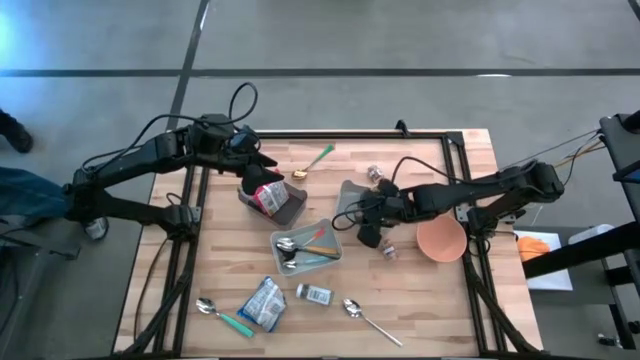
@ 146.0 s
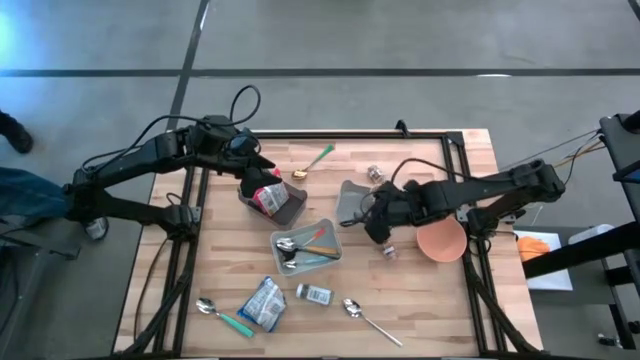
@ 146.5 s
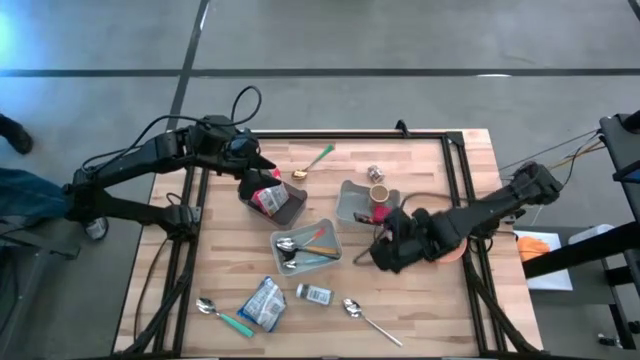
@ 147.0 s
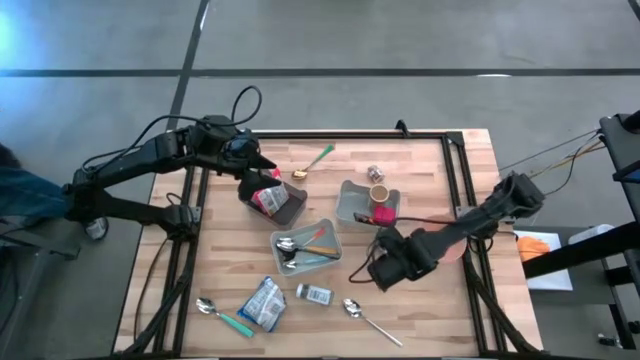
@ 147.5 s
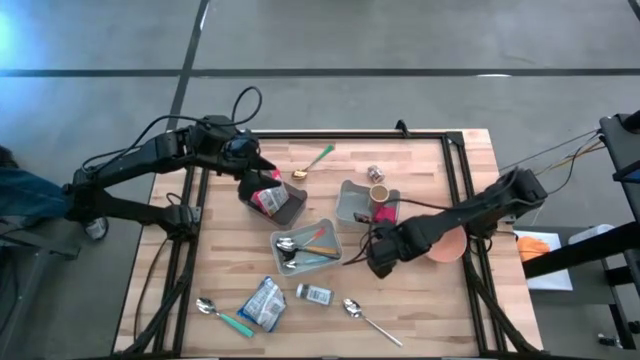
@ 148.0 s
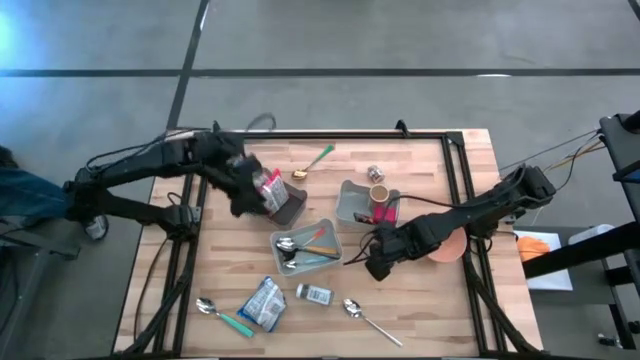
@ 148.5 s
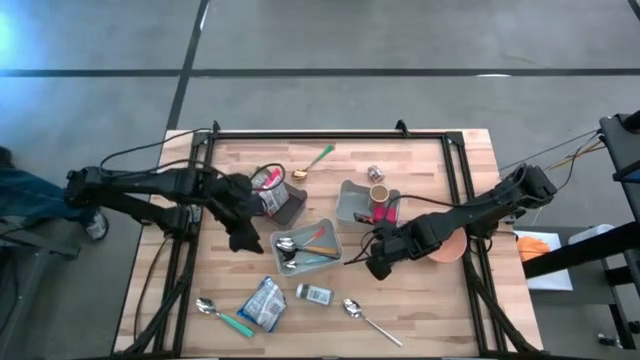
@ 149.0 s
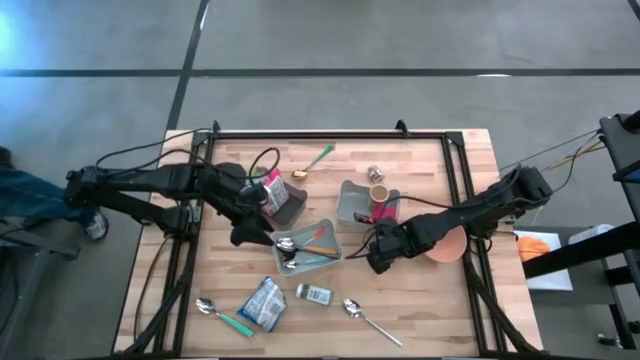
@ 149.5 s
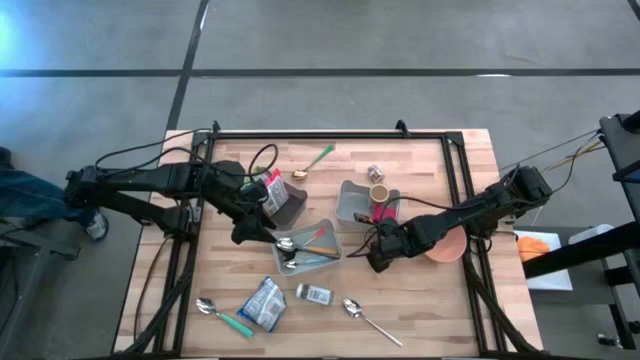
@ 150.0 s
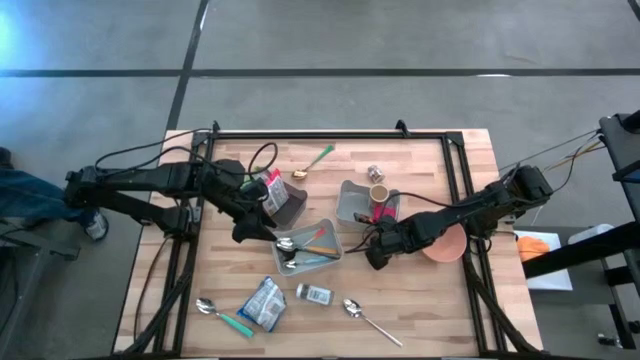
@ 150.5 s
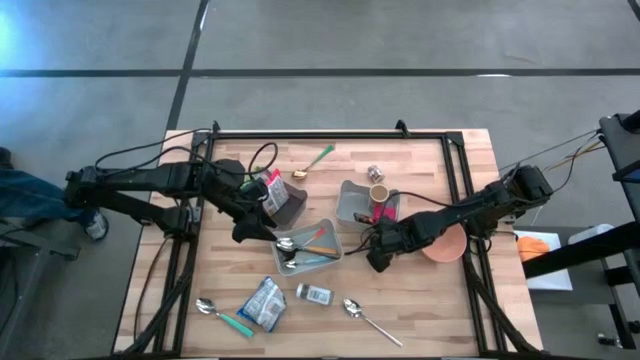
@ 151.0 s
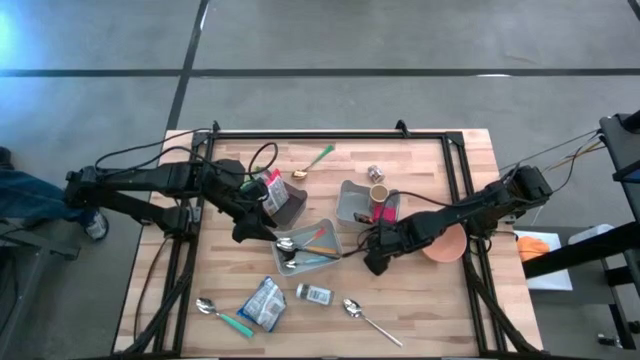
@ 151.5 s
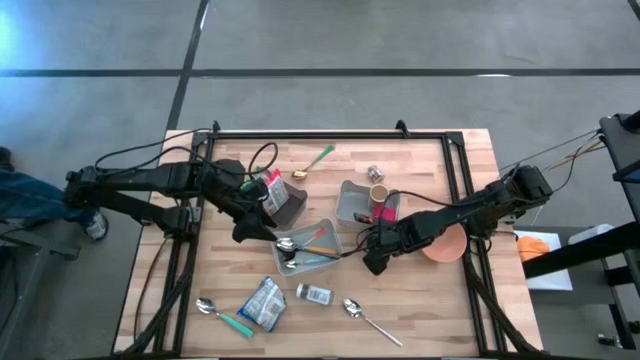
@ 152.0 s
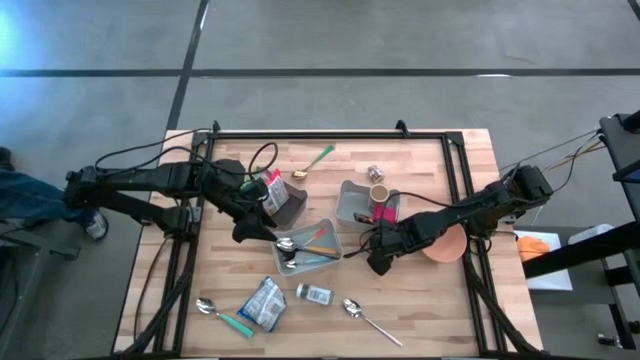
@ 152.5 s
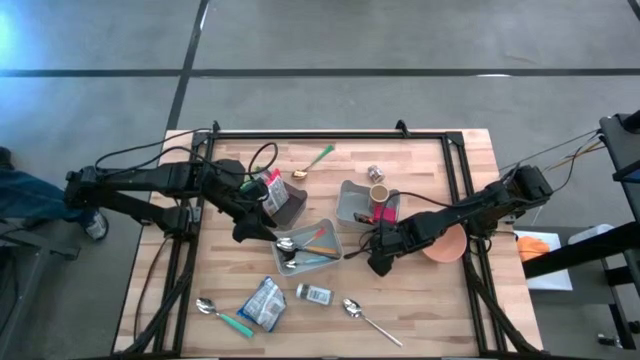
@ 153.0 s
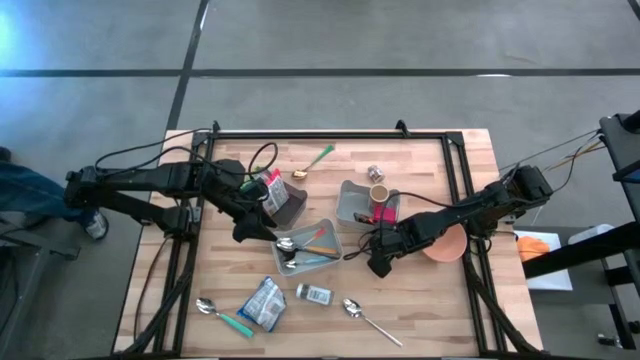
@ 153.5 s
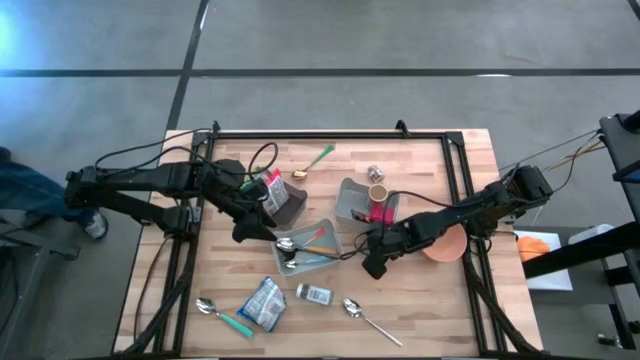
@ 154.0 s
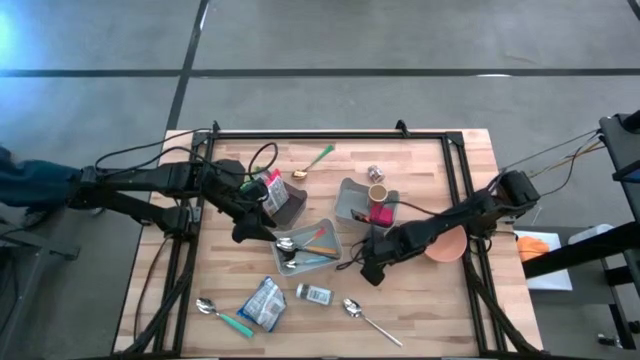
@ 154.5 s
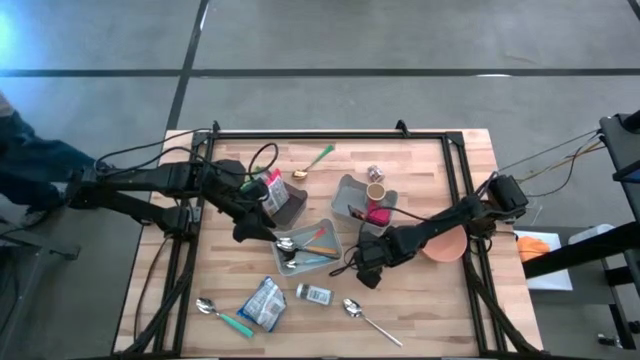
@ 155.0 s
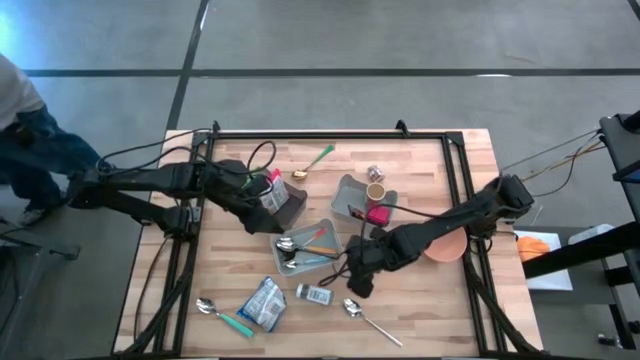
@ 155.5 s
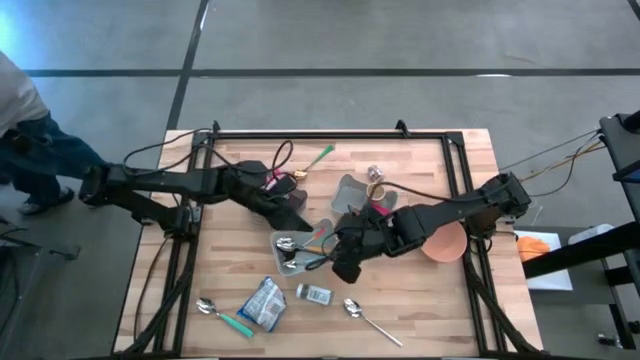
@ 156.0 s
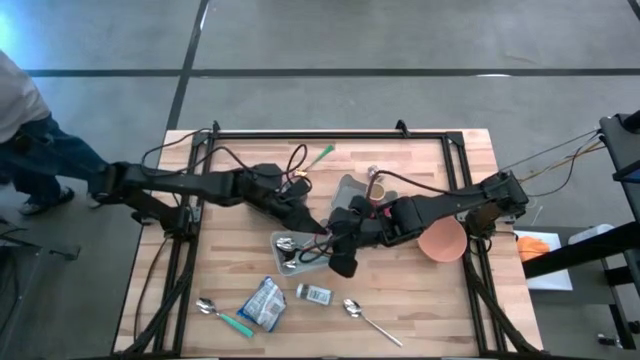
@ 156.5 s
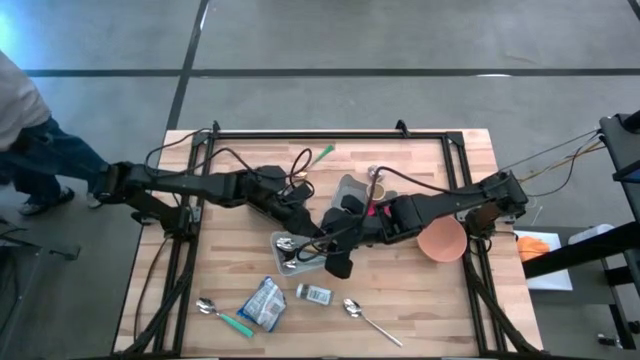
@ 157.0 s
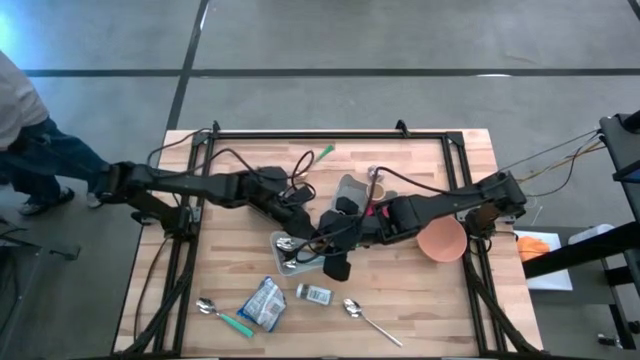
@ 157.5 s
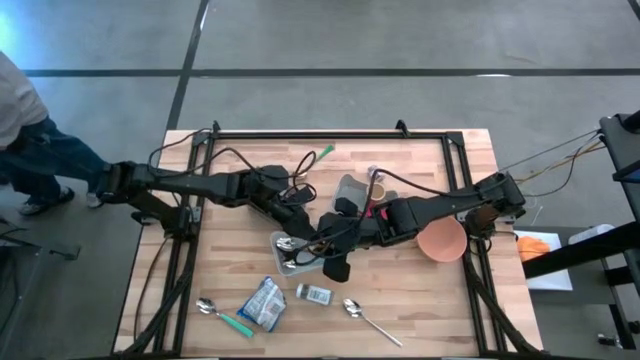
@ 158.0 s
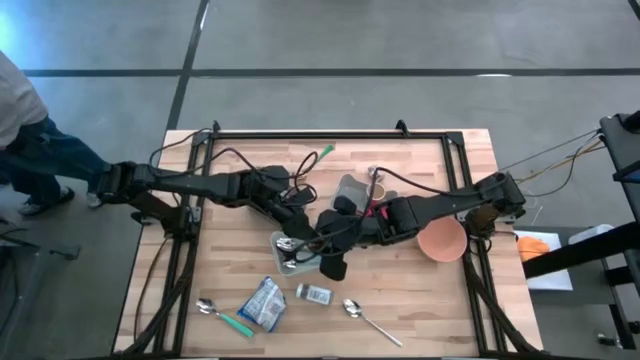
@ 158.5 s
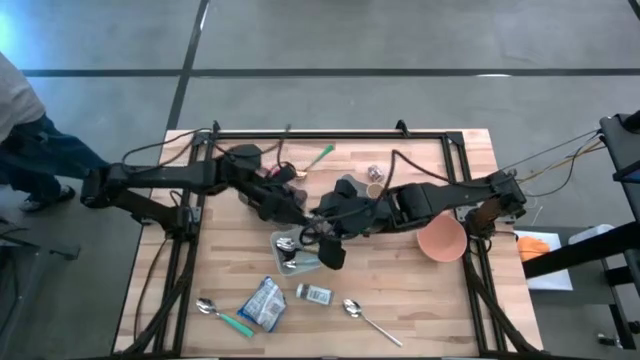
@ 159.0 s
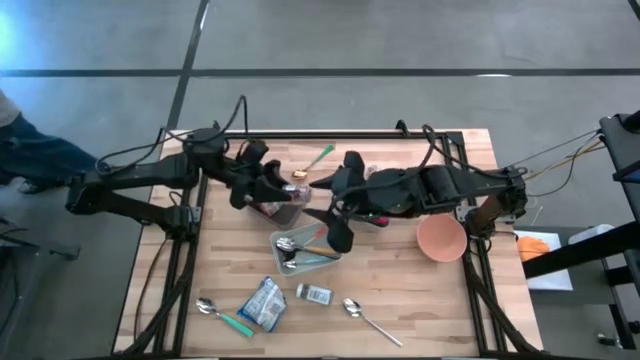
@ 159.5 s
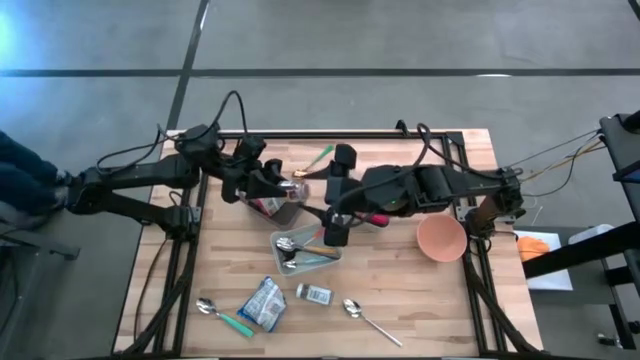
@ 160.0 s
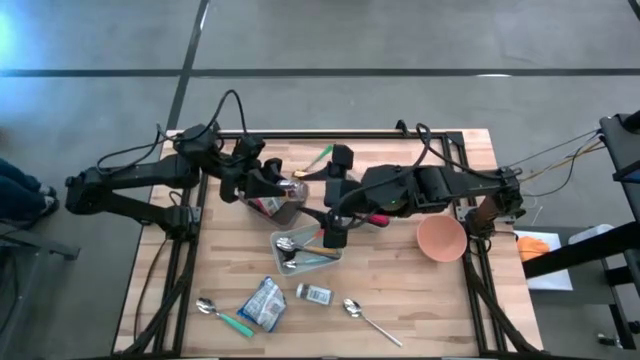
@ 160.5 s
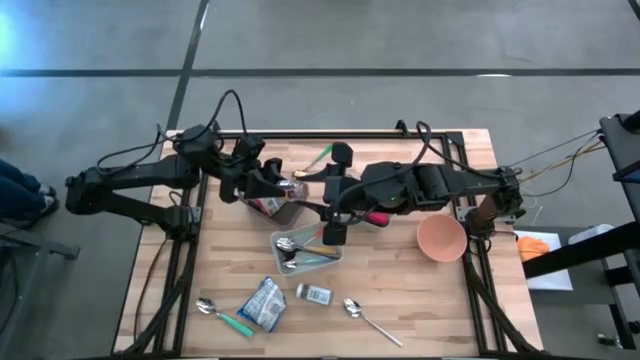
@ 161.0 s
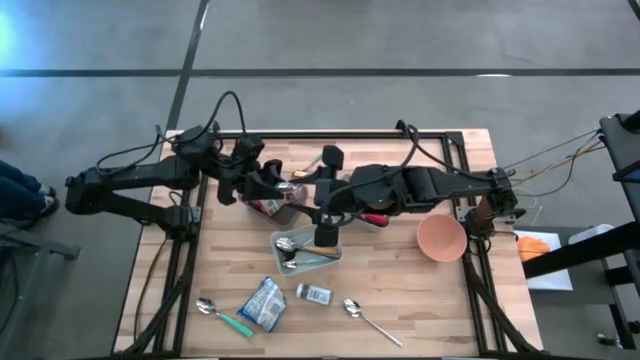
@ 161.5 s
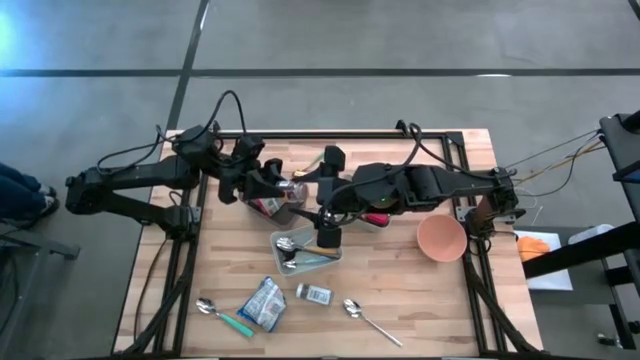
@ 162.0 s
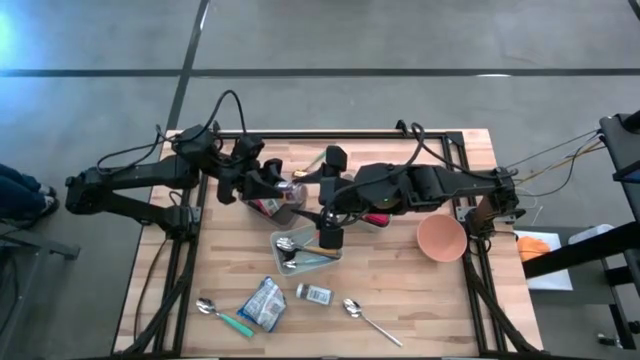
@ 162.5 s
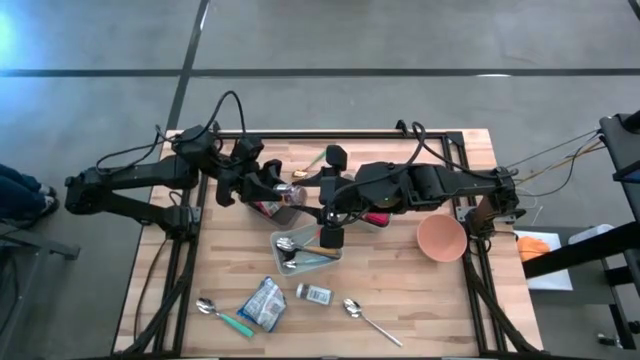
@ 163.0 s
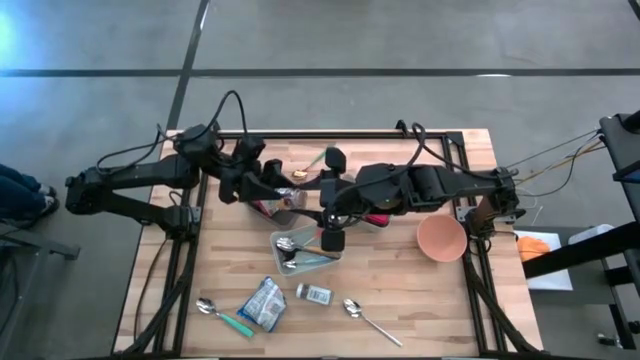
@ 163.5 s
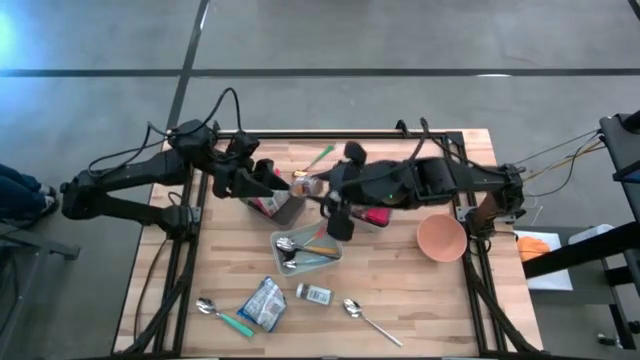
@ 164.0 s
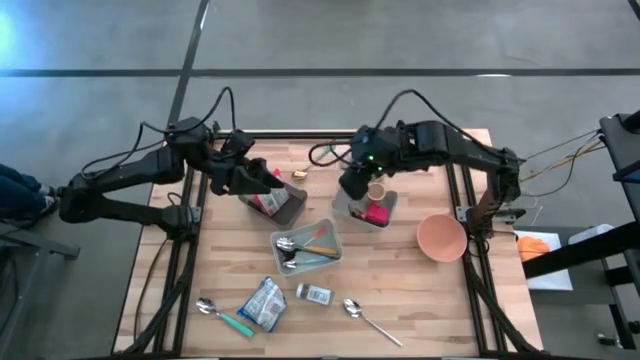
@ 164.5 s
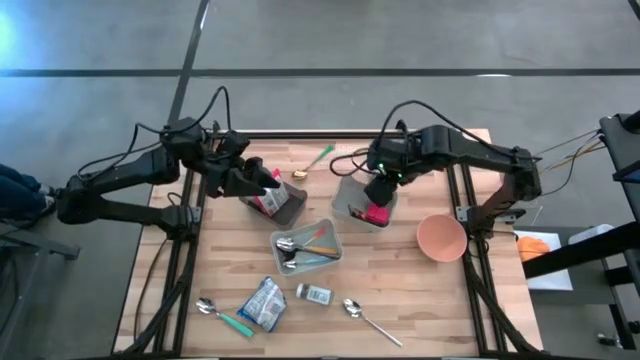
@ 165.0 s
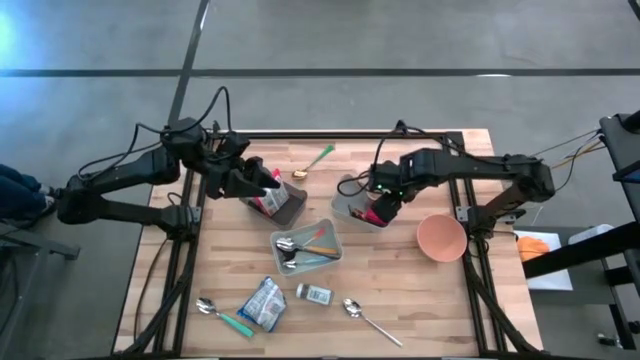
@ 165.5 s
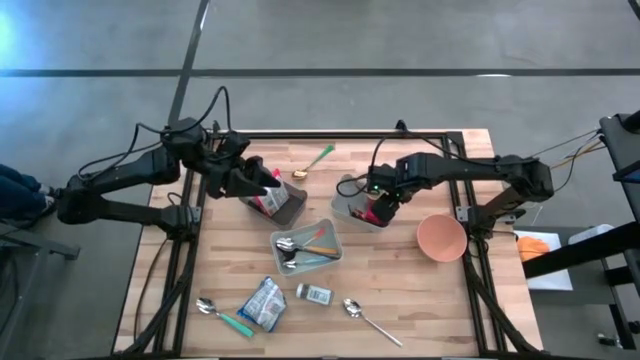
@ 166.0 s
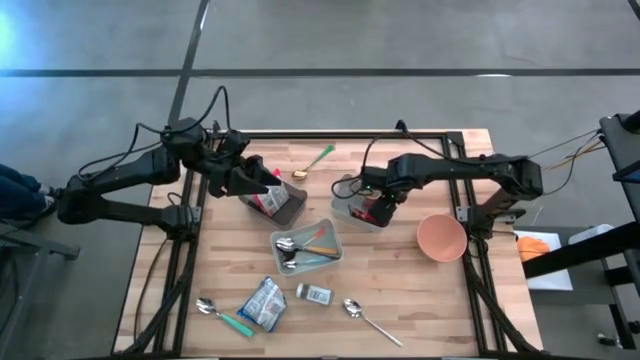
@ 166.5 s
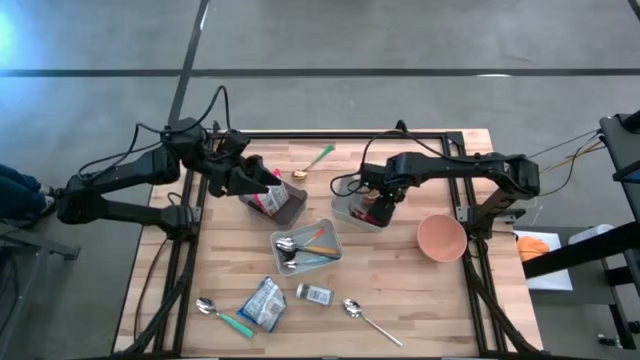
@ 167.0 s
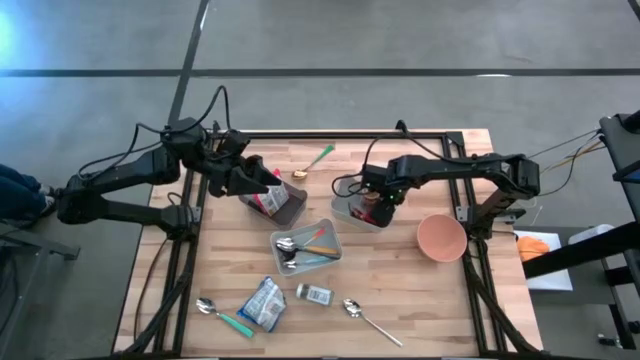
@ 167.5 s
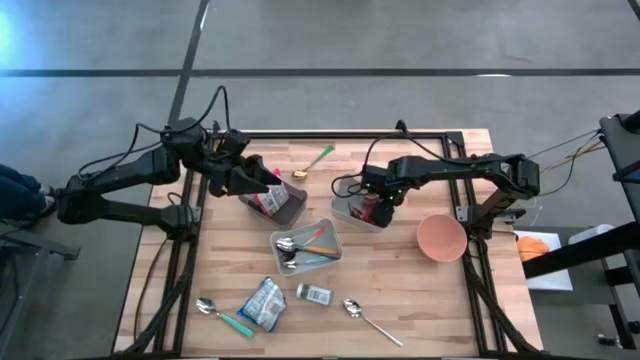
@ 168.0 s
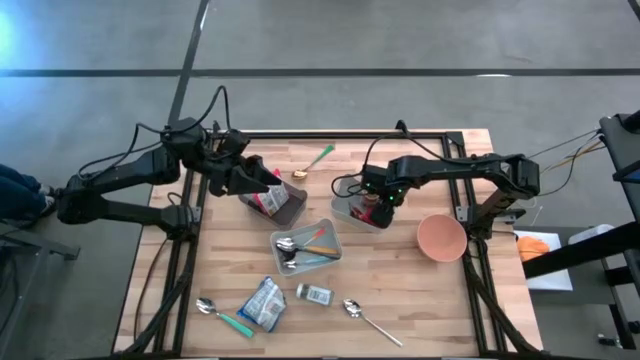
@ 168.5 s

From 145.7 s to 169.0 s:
Put the bottom brown seasoning bottle into the top gray bin
